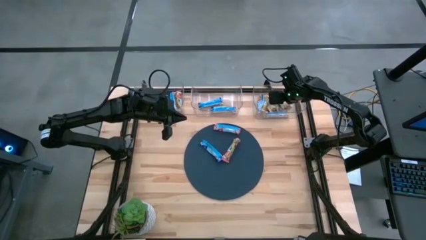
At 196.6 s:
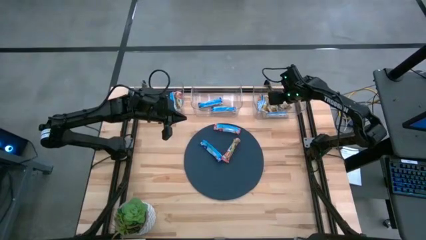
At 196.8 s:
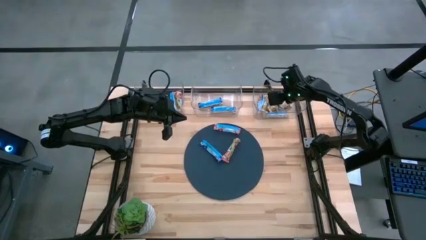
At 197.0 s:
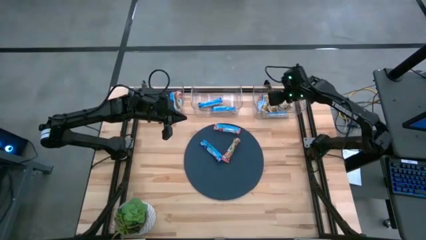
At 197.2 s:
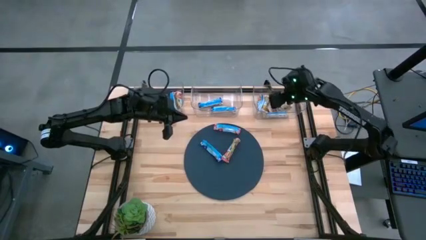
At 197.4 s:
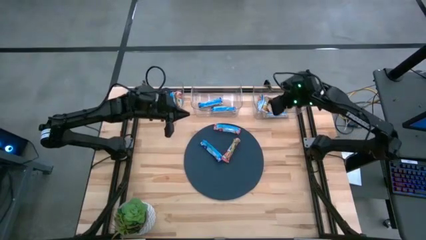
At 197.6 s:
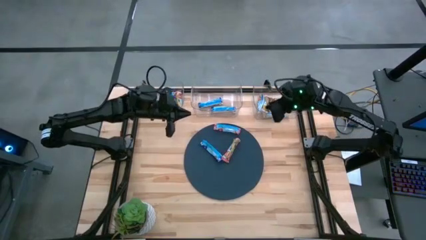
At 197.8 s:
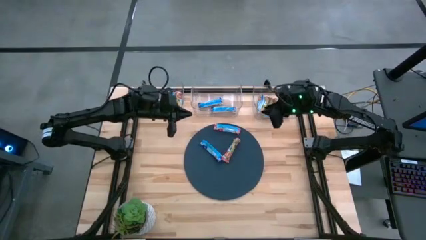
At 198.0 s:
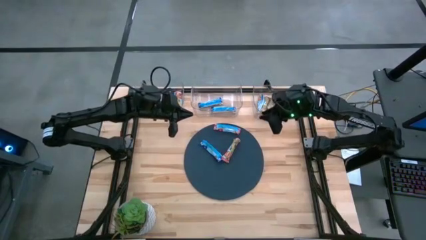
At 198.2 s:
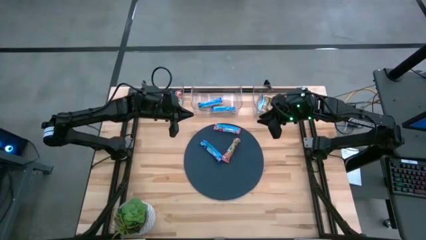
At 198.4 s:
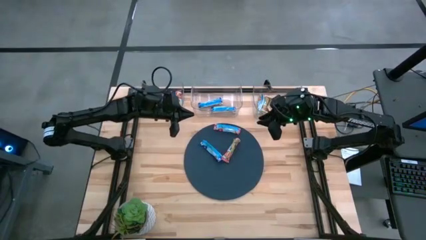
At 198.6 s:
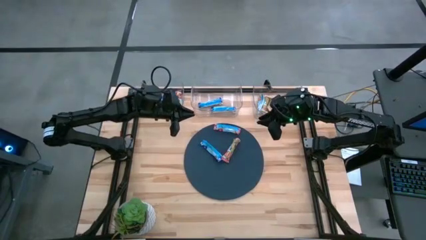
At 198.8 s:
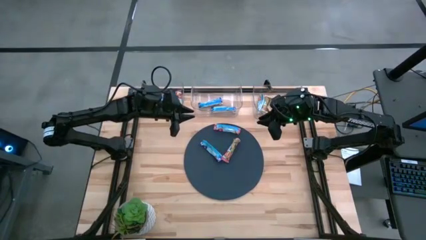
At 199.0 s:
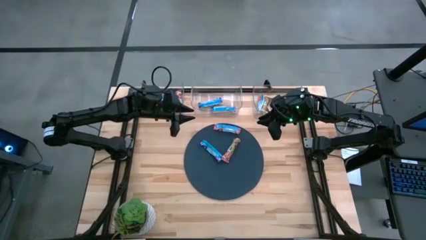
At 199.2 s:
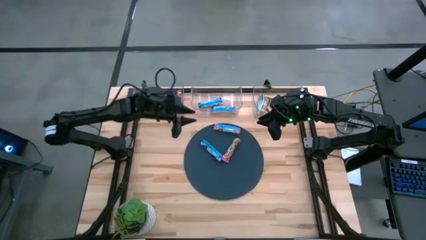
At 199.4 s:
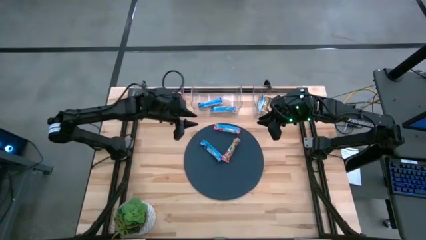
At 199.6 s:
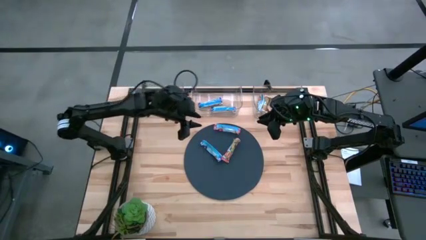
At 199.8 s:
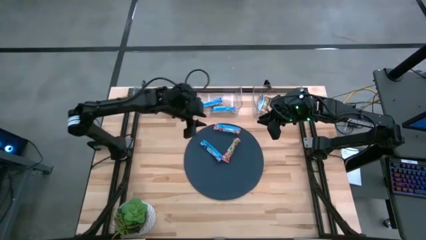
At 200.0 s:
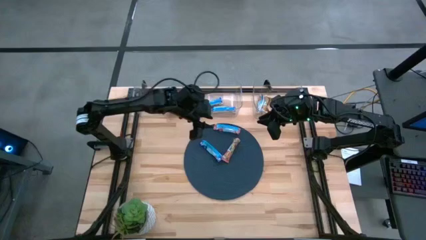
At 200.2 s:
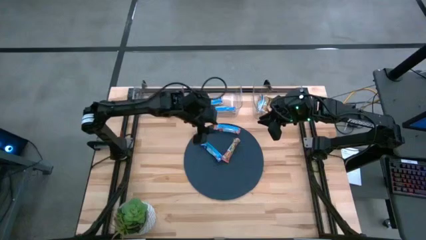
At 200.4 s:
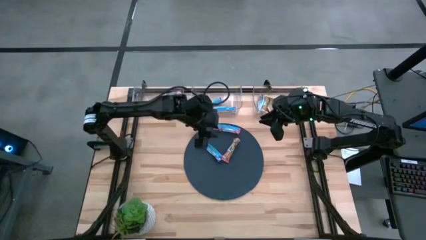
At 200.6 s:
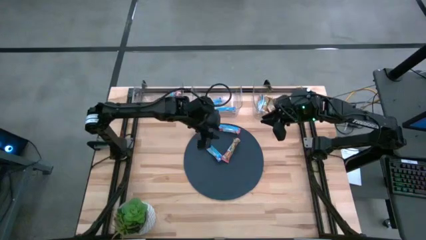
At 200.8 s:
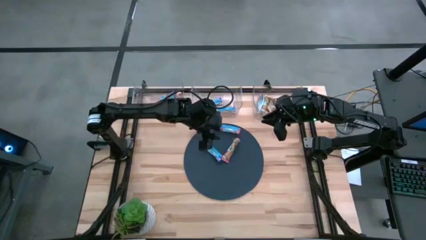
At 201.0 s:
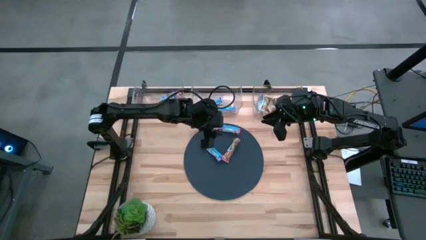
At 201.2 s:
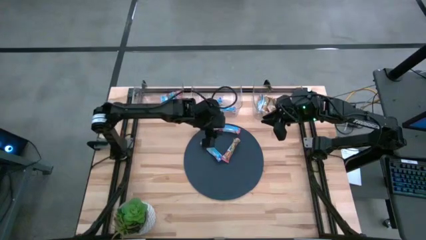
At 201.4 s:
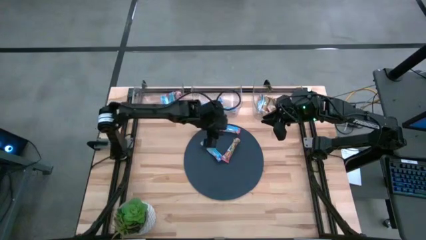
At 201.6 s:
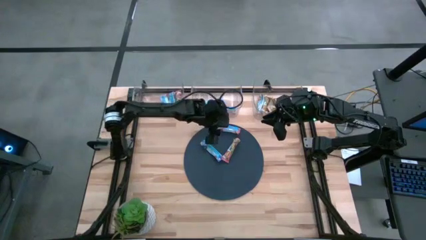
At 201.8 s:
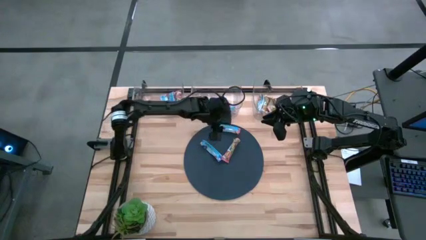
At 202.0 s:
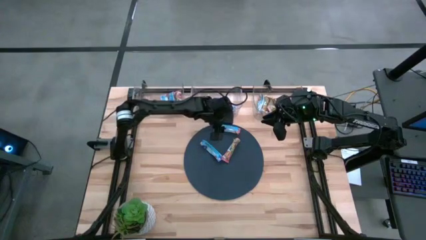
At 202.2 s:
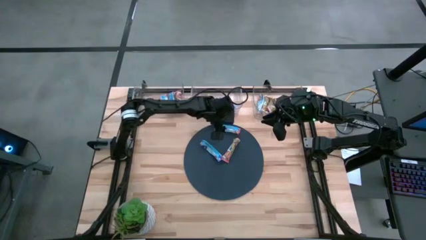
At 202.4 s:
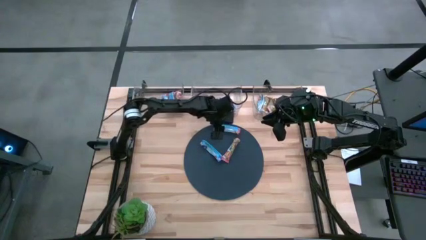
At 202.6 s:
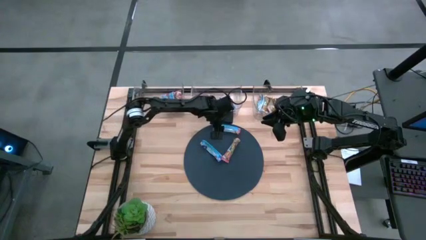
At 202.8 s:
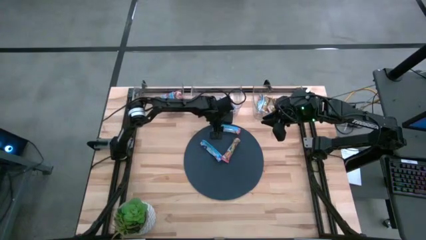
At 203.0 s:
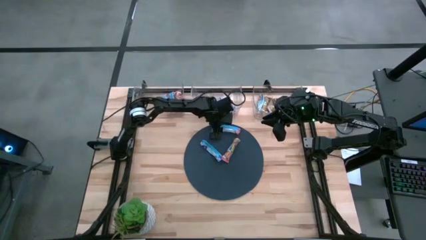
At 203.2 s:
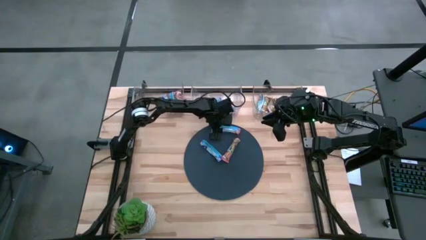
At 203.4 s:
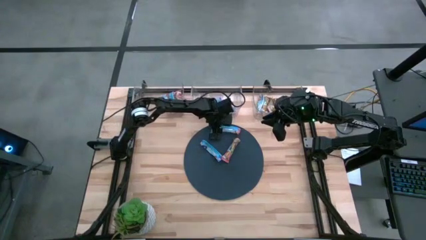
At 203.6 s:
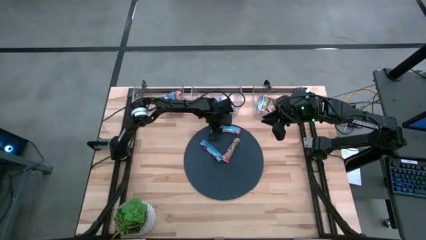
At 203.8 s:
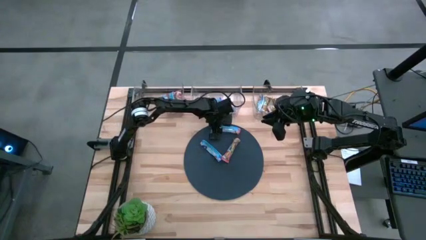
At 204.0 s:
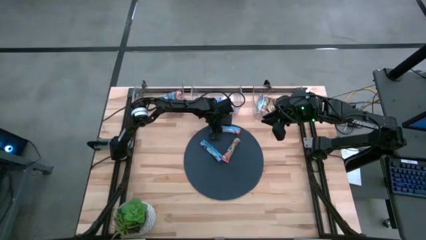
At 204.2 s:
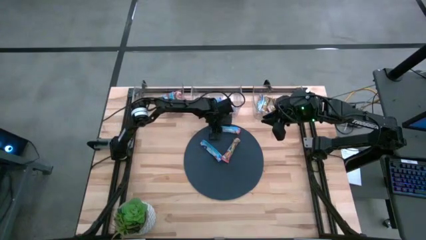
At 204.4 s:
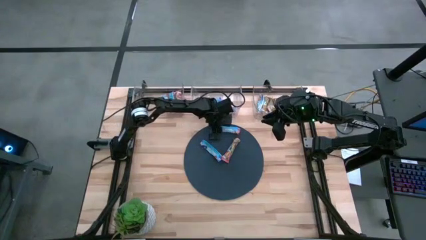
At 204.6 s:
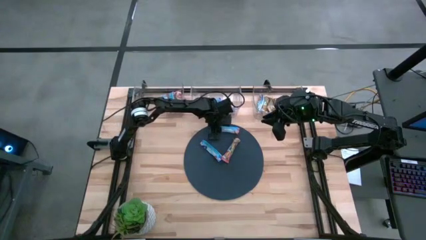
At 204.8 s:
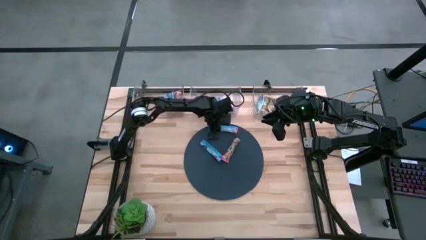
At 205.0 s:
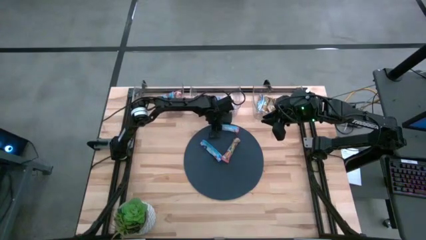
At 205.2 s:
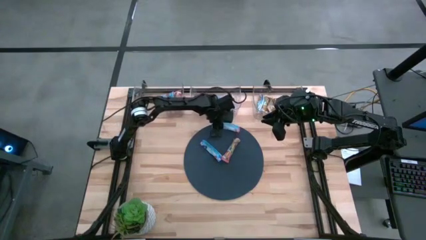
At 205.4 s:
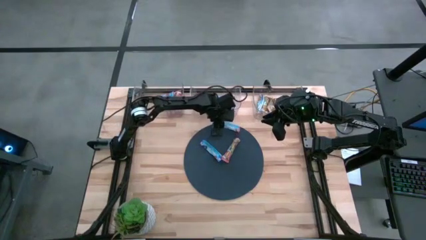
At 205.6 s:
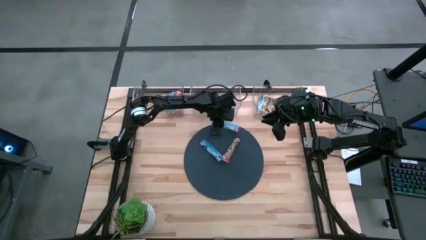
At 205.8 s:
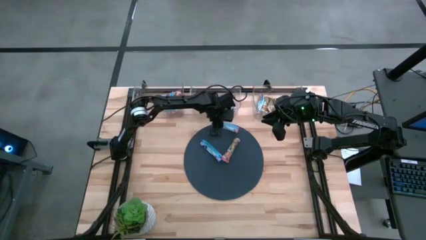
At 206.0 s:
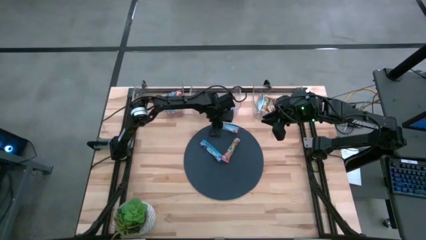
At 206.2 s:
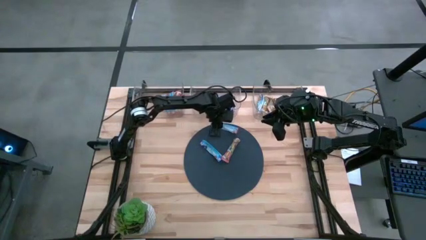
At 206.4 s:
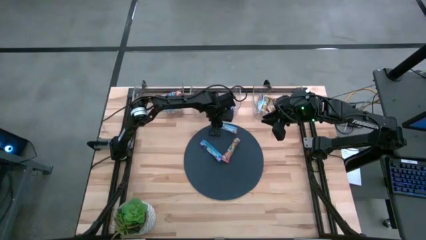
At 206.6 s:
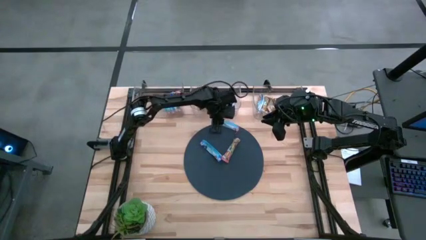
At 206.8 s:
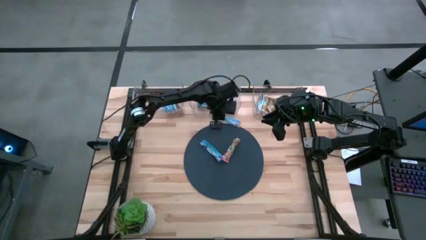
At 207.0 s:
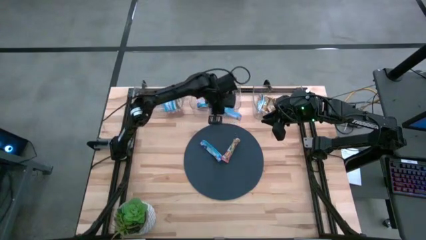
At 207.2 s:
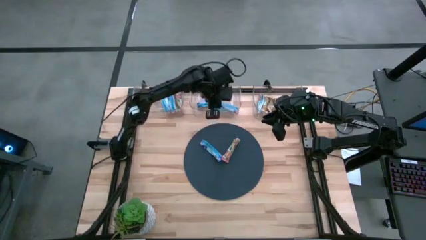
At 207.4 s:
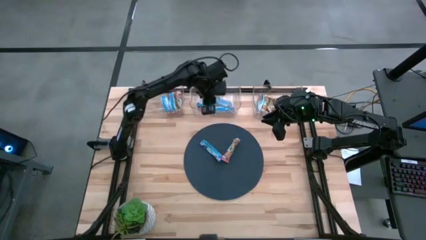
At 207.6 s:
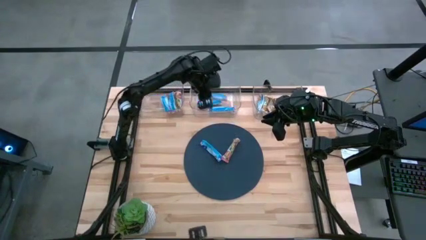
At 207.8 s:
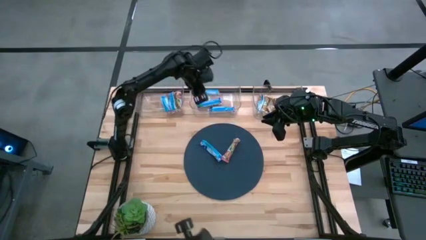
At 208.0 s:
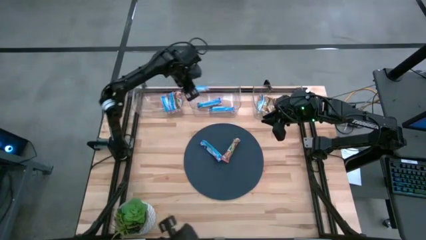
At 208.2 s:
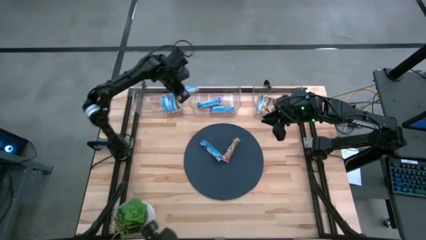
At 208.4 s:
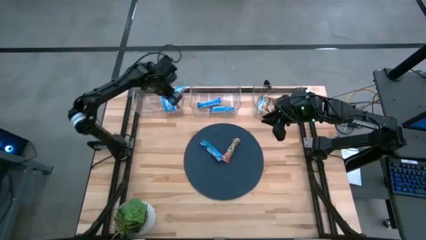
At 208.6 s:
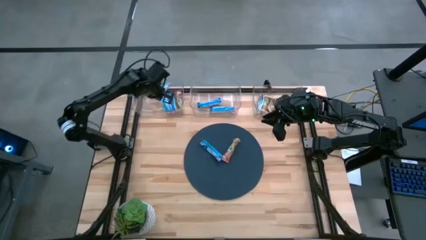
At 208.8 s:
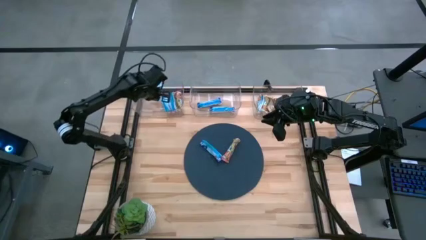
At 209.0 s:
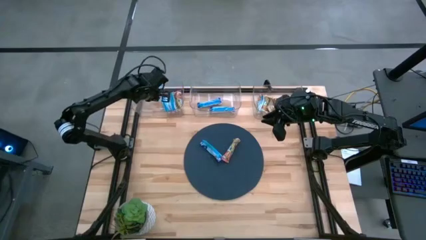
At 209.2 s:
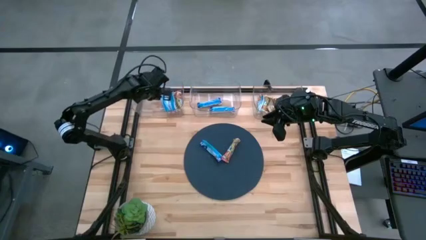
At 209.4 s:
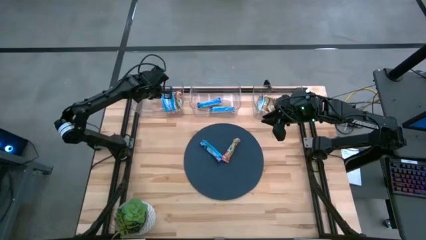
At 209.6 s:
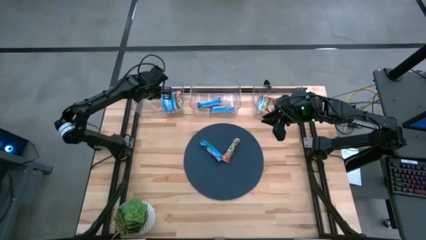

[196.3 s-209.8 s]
Task: Pick and place Granola Bars by type
Put the red granola bar into the left transparent bin

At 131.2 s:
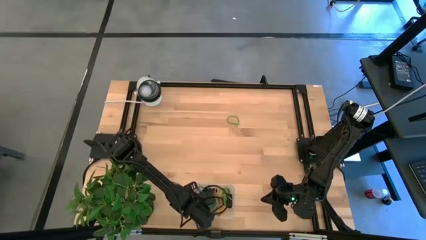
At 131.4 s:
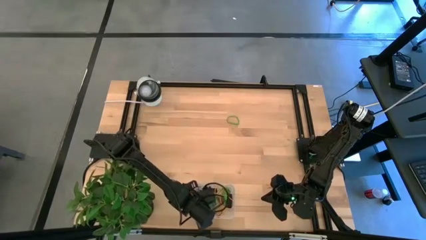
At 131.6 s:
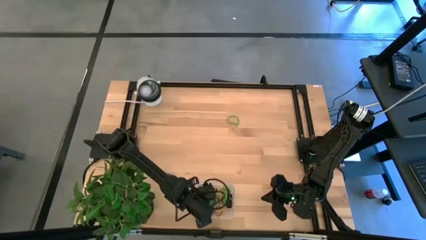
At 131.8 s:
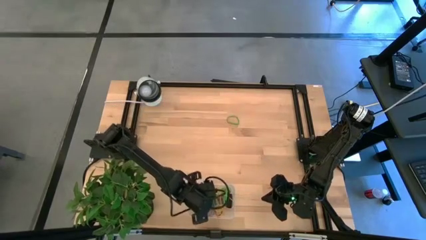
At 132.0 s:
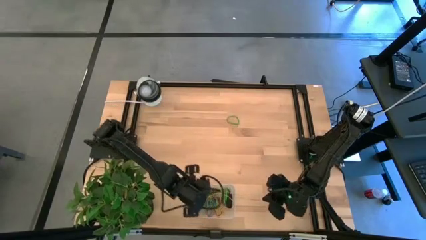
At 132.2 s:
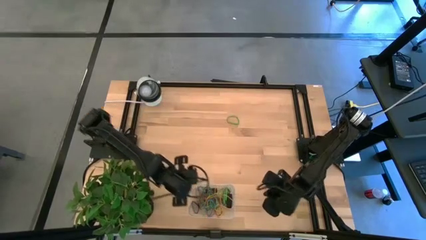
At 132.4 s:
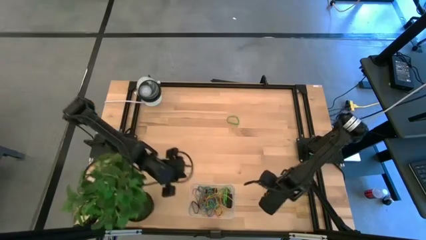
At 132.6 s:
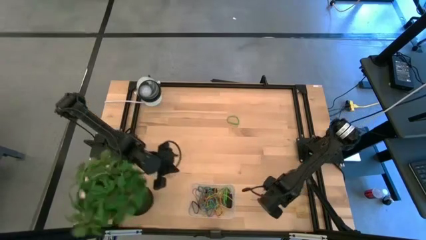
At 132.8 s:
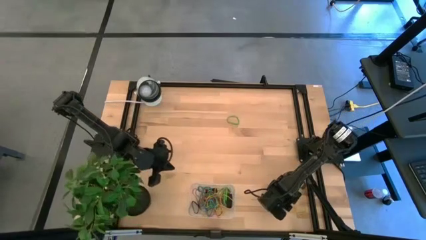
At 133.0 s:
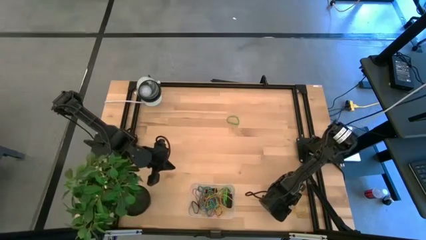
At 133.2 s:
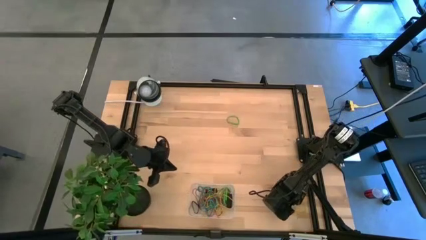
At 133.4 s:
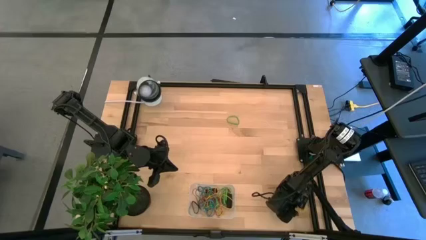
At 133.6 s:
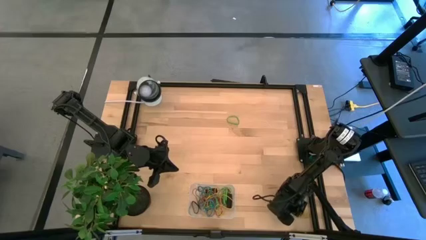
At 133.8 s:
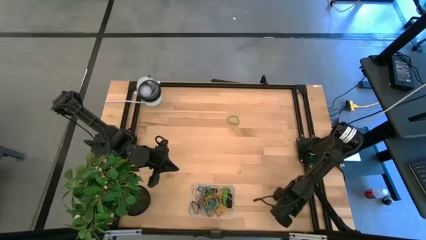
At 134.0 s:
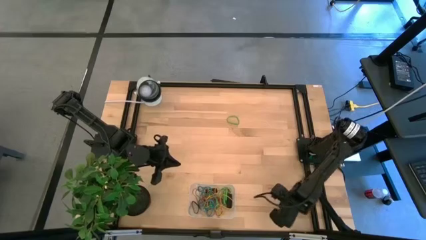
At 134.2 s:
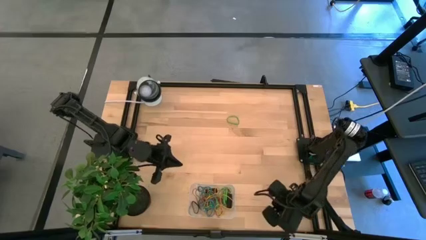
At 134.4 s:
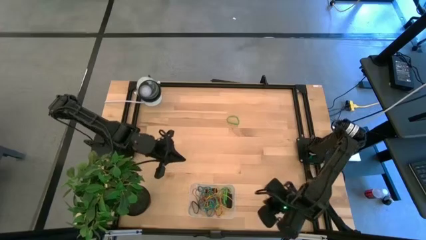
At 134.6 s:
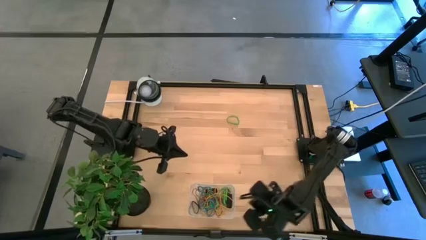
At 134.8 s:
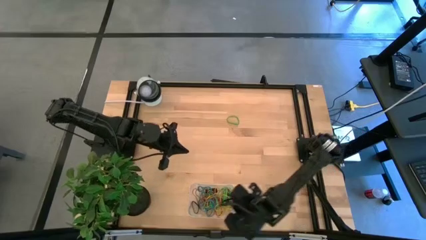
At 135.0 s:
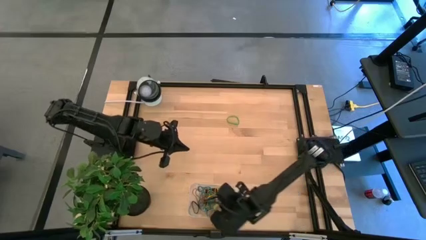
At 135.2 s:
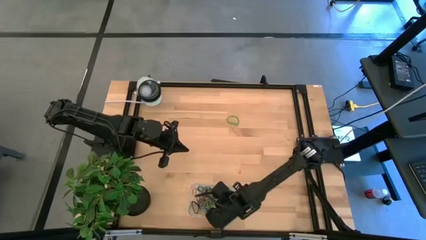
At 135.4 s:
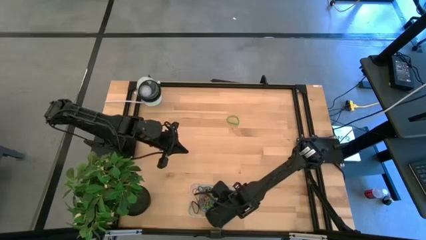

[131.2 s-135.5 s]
Task: Pick and place rubber bands into bin
Put the yellow rubber band into the transparent bin
